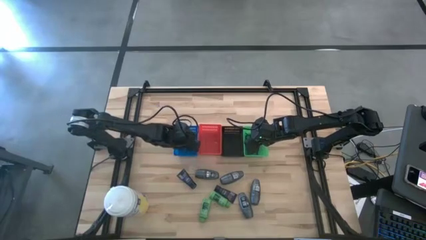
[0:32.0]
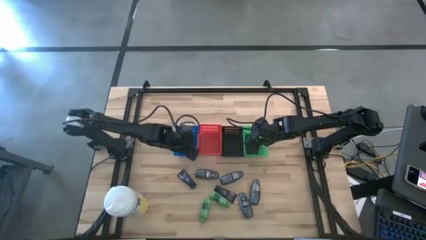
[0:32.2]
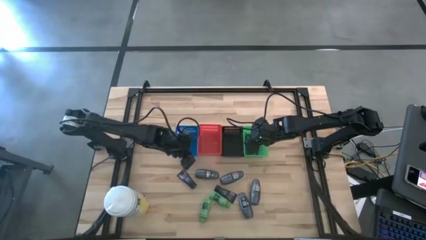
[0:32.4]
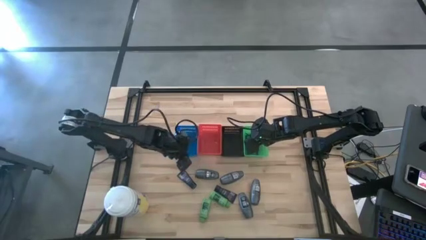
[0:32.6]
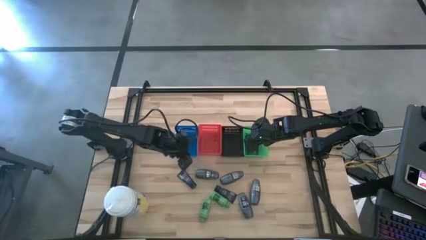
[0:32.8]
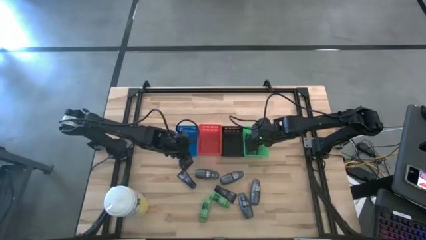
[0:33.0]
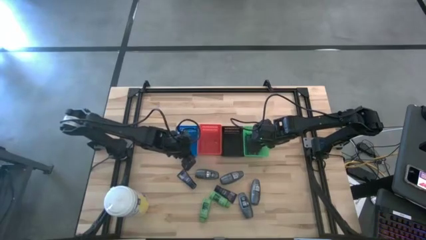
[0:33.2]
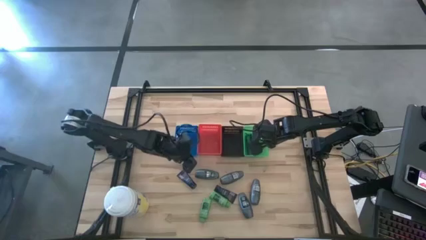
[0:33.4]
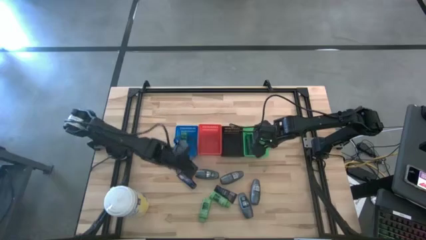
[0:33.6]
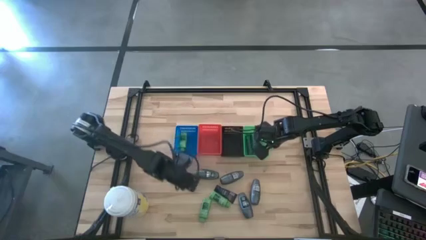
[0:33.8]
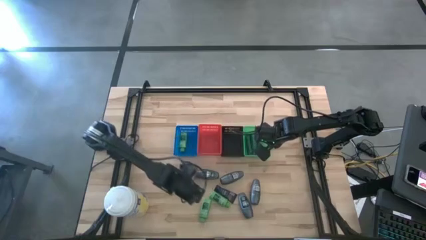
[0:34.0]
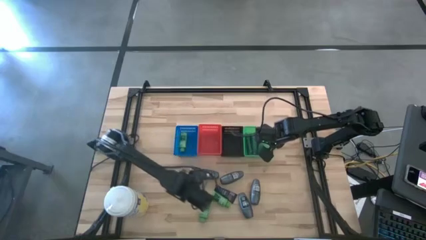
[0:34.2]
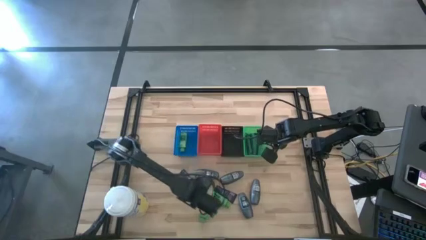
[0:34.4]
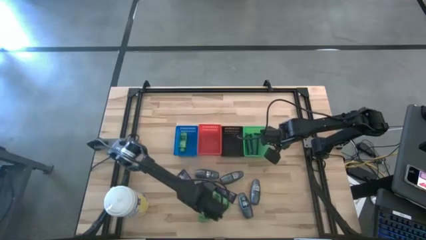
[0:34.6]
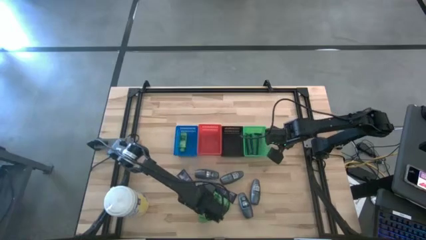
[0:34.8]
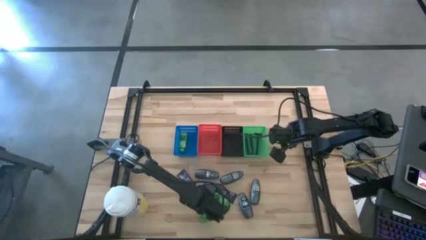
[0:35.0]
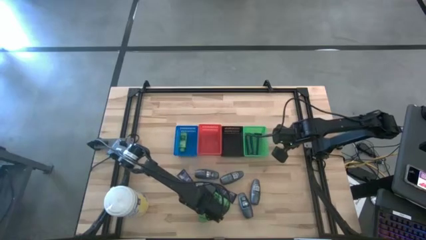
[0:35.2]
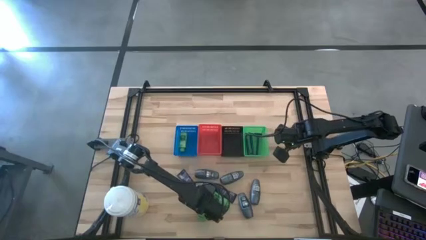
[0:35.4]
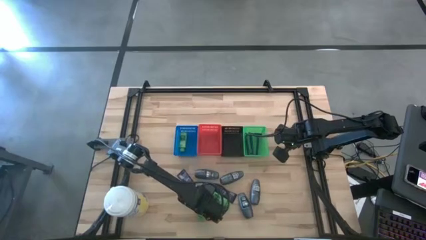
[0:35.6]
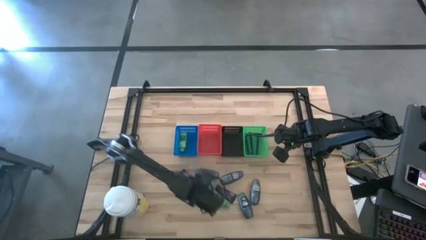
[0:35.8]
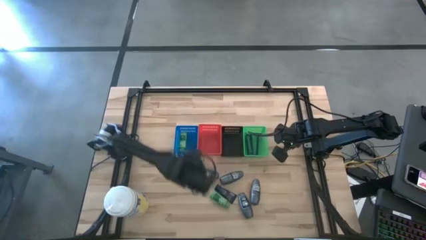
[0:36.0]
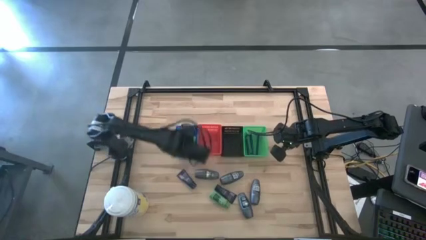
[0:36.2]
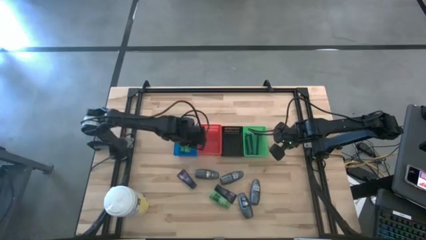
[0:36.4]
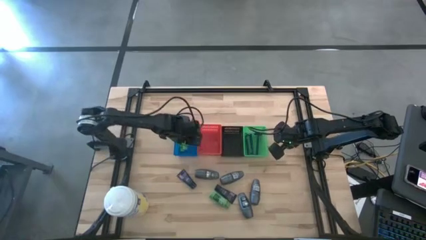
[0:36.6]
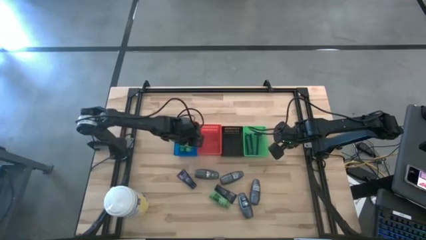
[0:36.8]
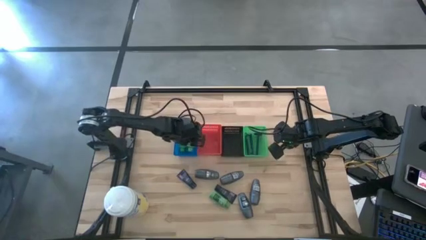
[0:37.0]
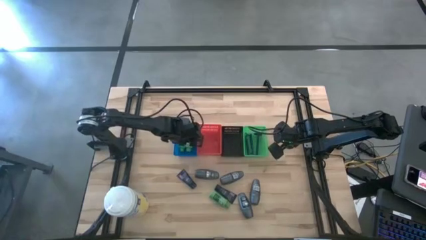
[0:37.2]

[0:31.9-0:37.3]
Task: Pick & Place Travel size toiletries
Put the shampoo into the blue basket

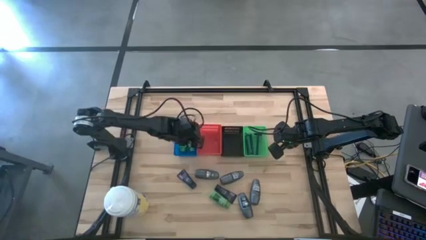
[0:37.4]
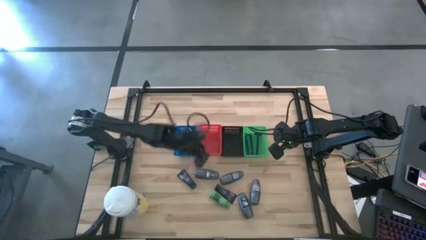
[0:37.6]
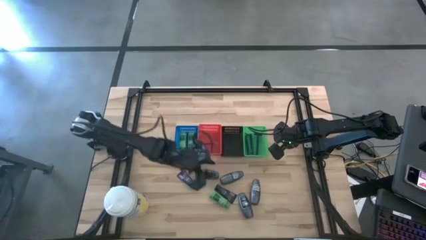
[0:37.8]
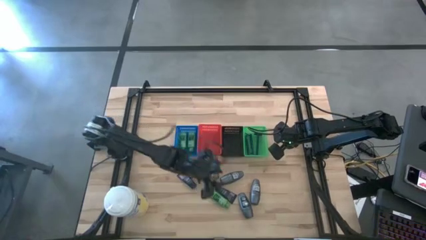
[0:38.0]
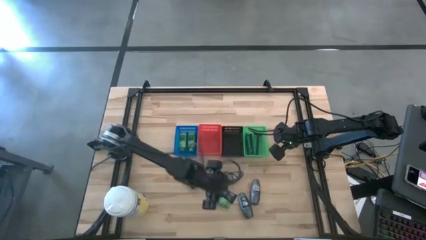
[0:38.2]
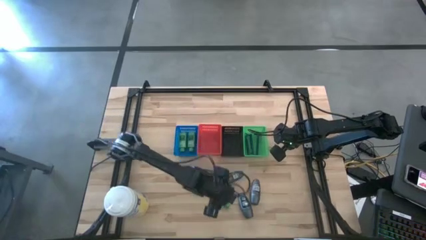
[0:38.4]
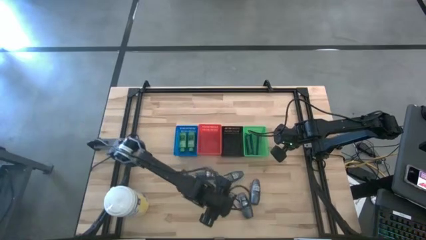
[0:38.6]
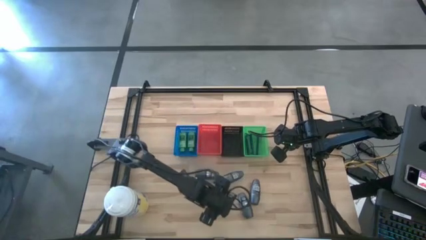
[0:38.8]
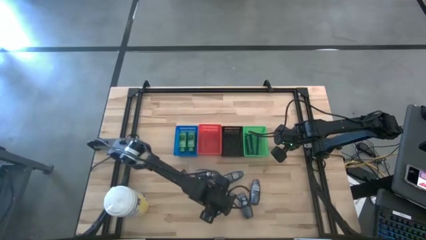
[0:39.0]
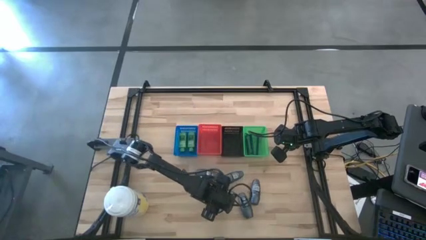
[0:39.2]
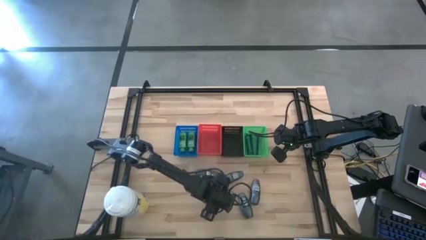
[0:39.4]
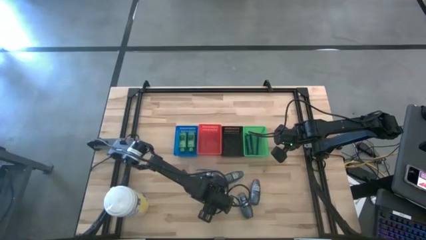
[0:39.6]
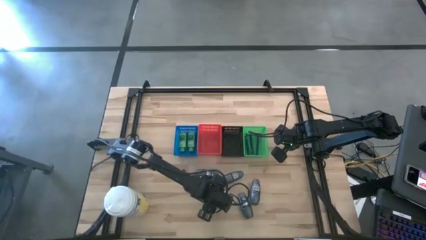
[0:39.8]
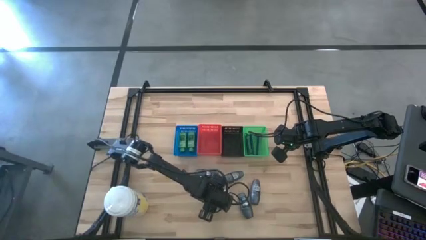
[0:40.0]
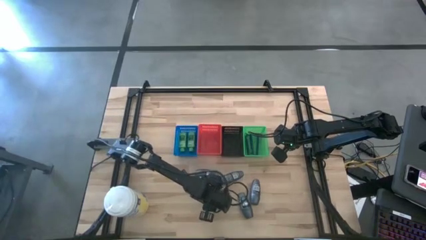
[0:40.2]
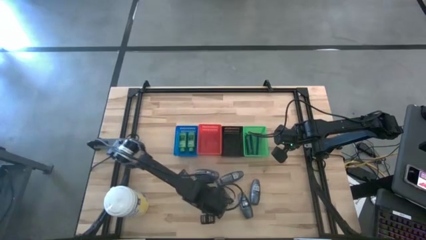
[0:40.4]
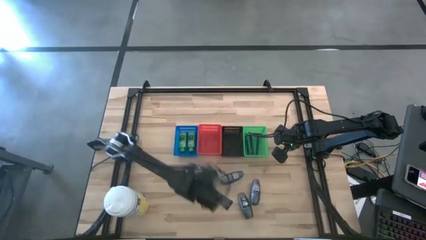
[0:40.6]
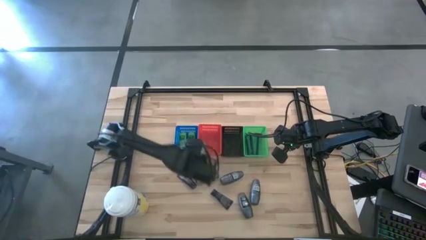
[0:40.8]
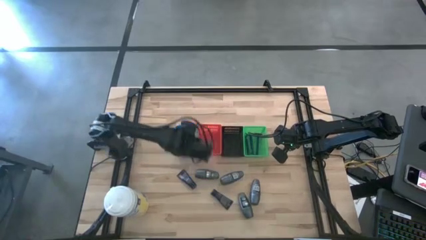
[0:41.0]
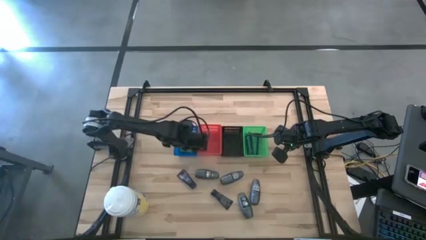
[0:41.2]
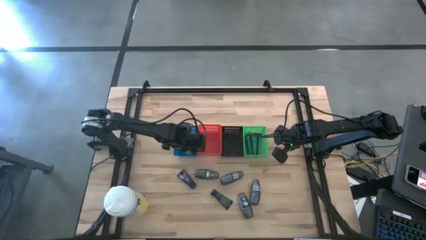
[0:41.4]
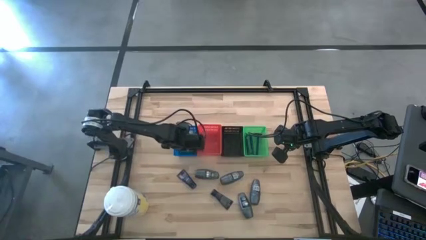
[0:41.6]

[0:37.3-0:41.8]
Put the shampoo into the blue basket

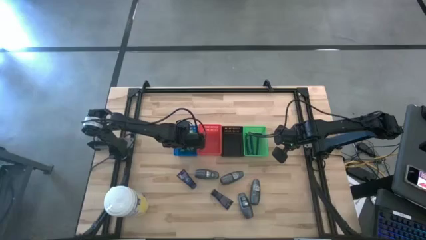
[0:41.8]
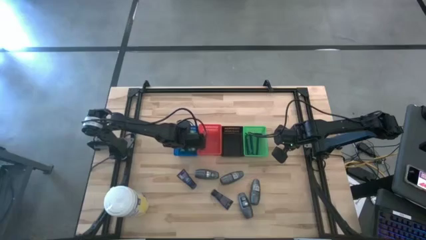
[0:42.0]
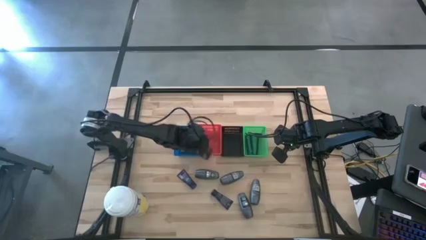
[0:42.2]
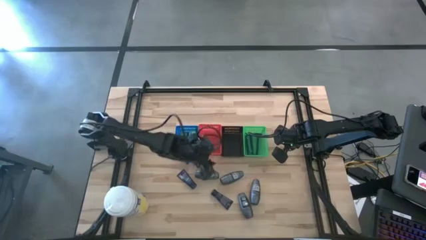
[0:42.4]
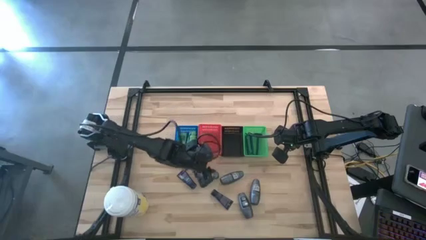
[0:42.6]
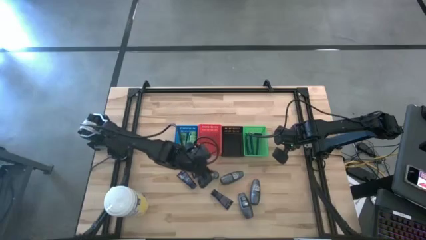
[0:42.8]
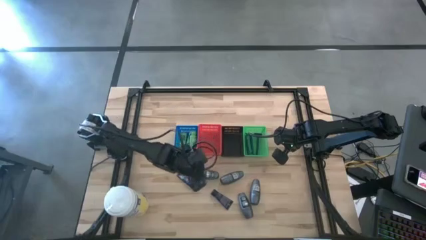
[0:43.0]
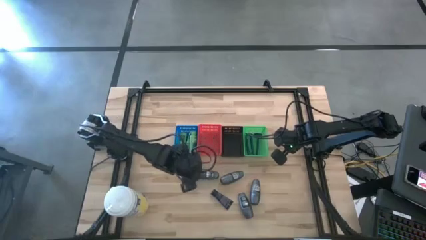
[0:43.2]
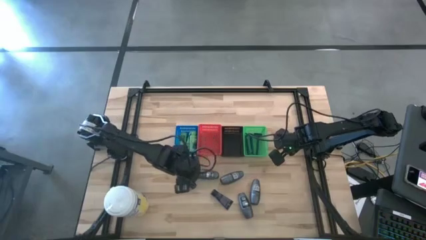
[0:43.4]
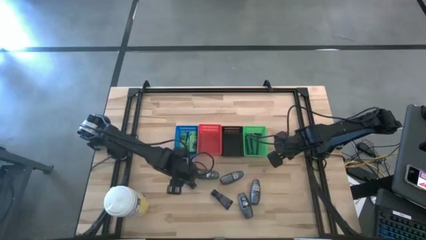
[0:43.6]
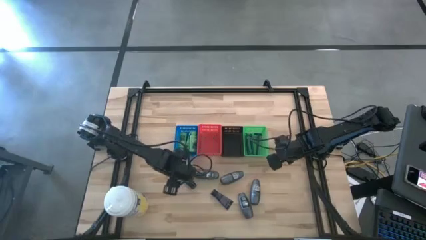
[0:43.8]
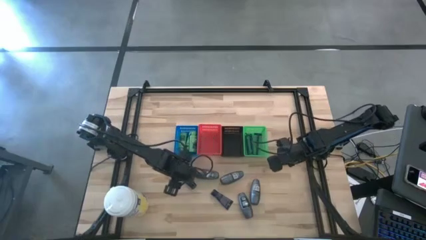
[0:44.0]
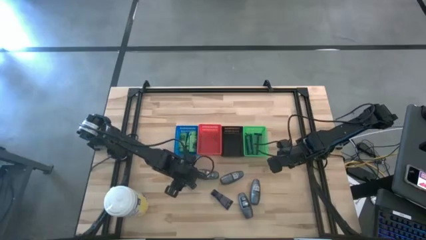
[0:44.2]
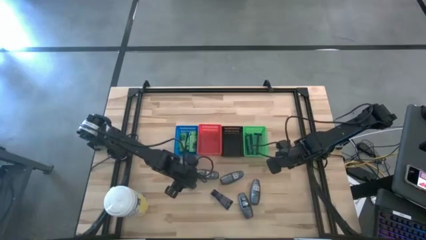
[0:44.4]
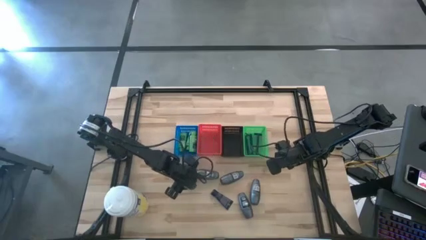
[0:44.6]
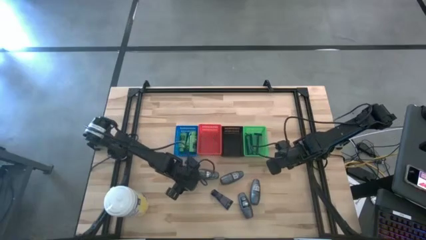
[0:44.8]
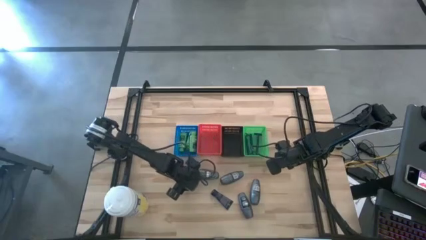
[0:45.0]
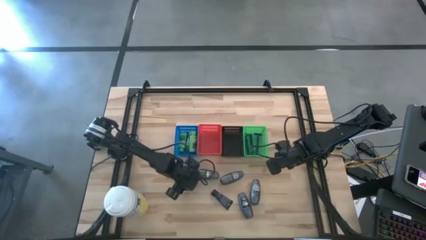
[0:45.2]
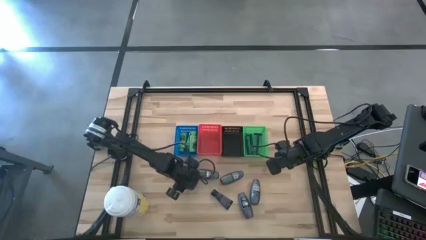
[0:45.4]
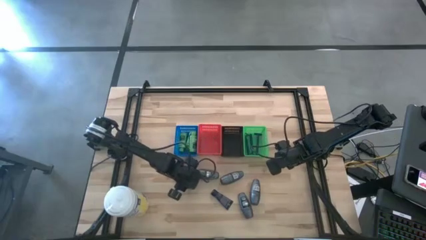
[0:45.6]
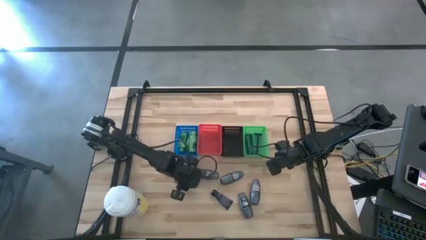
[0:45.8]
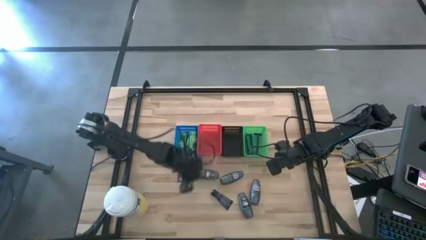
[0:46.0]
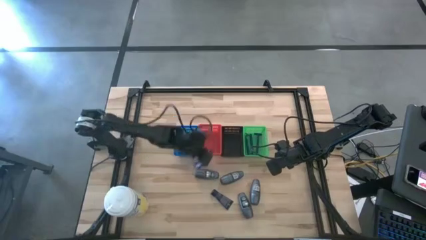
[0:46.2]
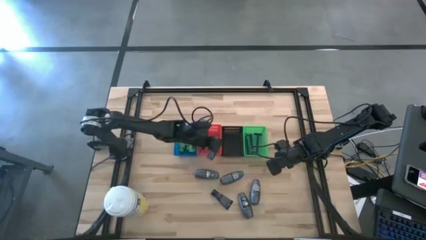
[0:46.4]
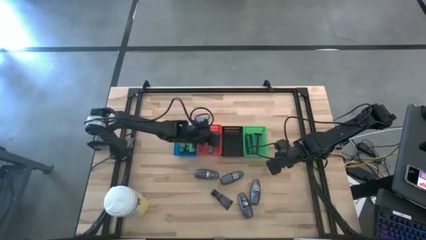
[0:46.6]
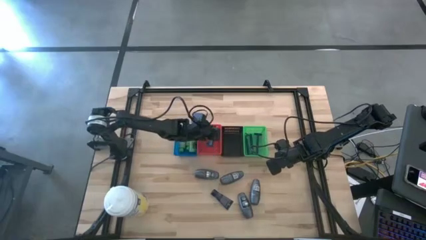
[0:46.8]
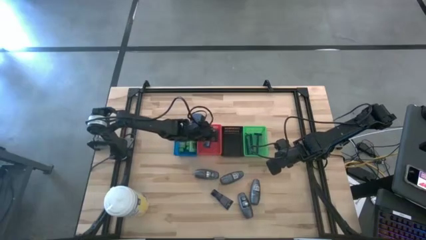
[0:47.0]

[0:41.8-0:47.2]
Put the shave cream into the red basket

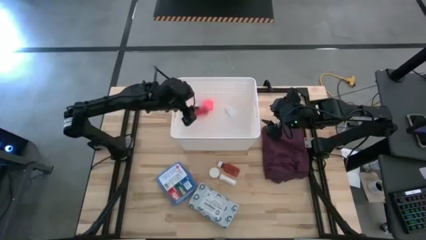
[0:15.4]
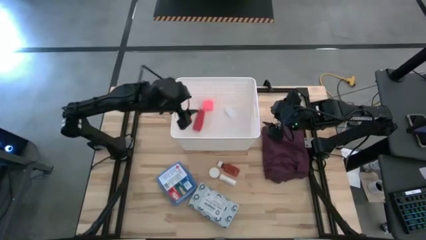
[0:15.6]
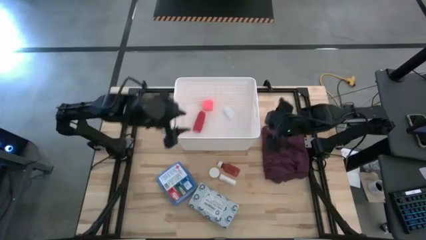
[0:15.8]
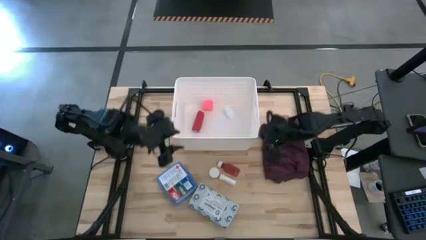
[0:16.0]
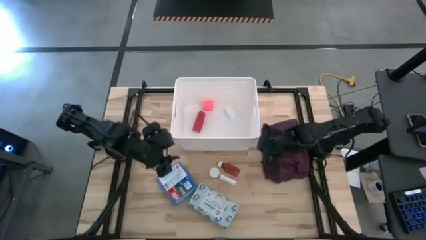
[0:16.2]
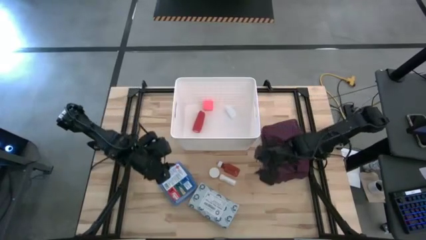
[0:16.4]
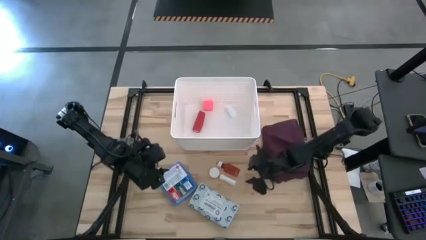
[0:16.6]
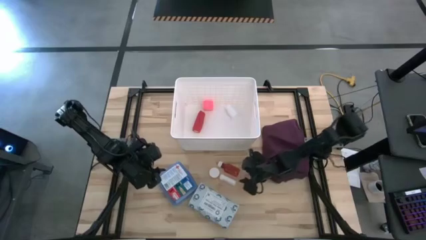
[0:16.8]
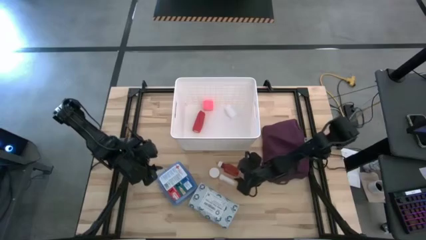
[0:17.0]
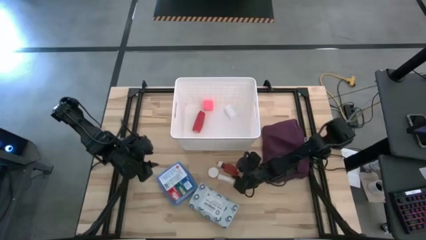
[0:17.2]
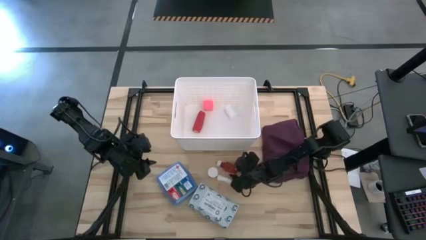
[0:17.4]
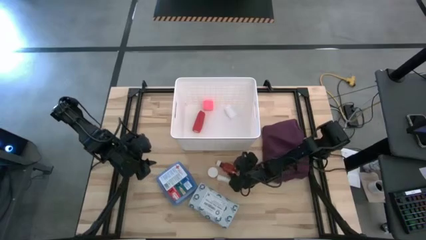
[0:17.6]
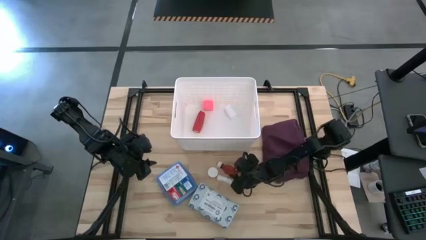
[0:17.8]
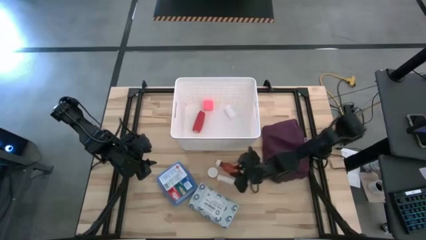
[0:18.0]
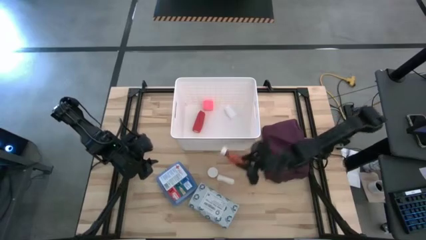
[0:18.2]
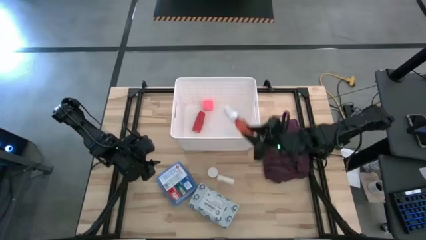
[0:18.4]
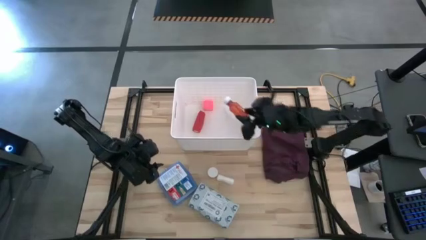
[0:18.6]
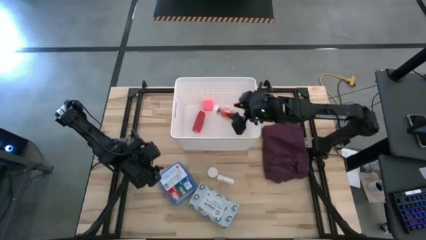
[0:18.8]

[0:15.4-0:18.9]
Task: Pick & place medical supplies in basket/bin
Put the bottle into the white basket
